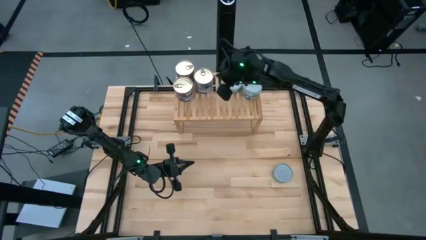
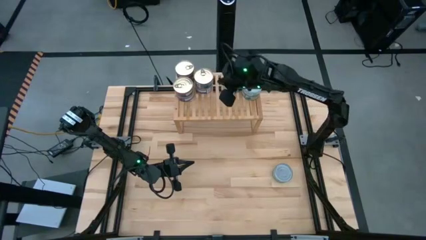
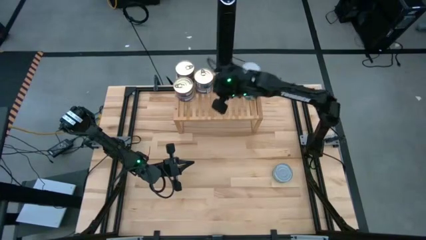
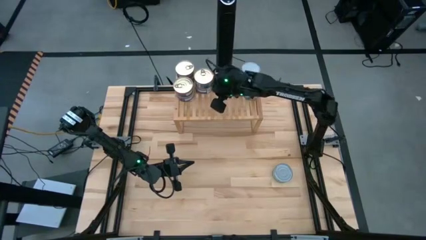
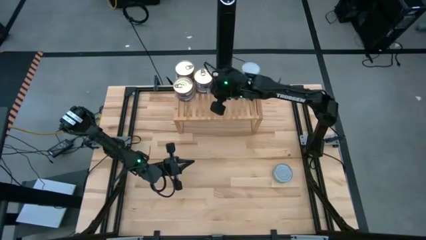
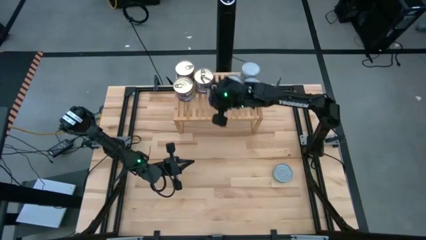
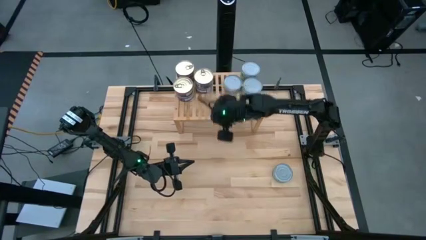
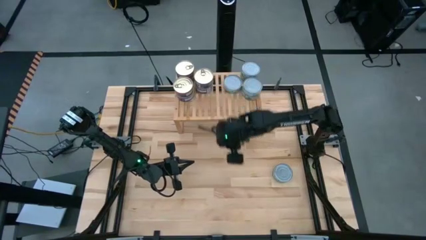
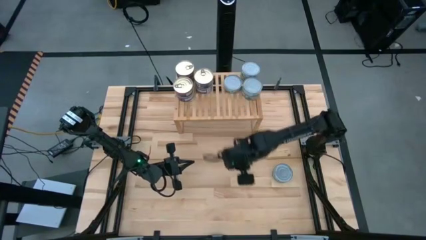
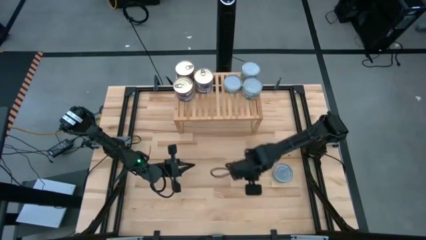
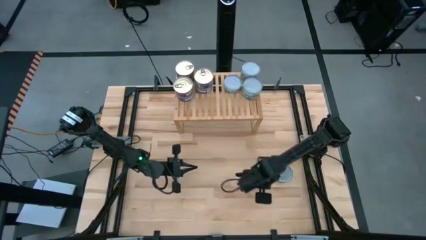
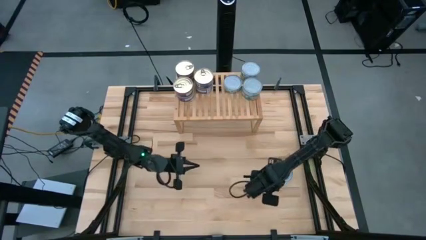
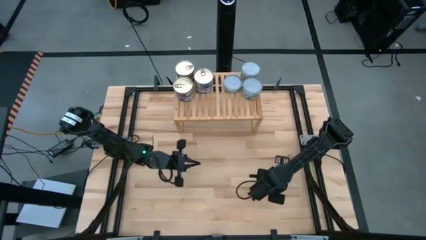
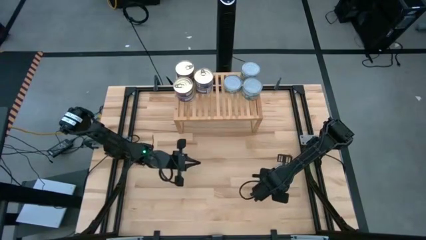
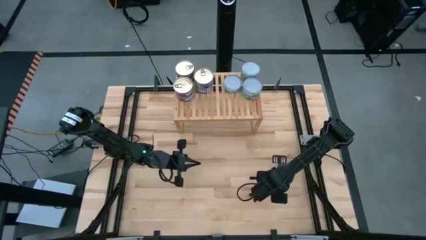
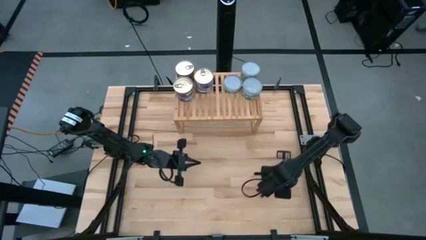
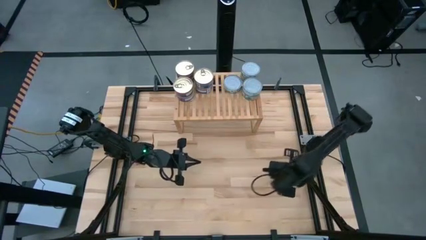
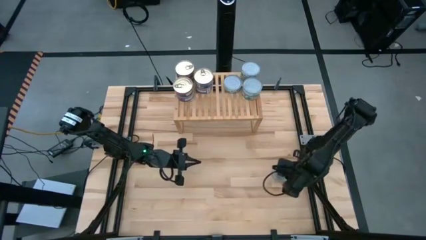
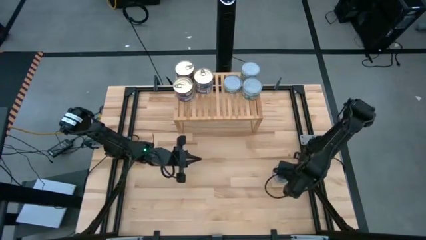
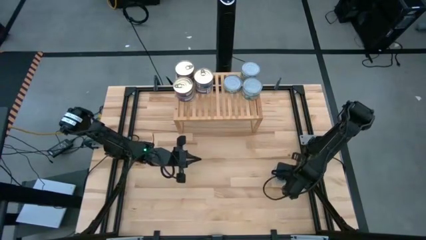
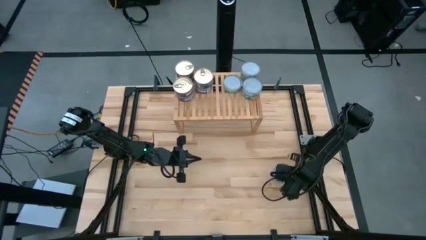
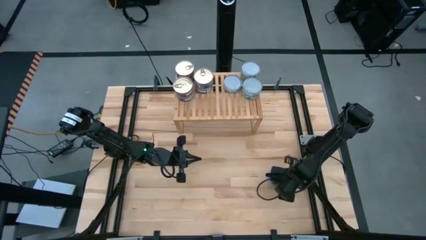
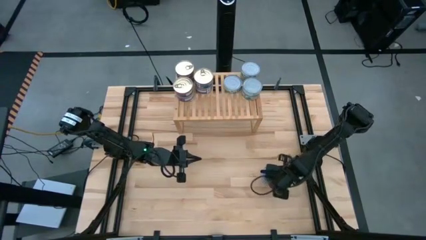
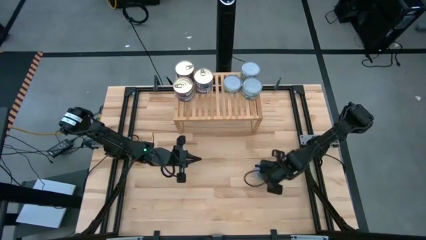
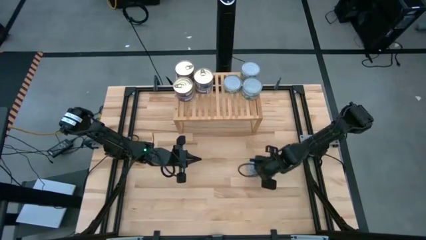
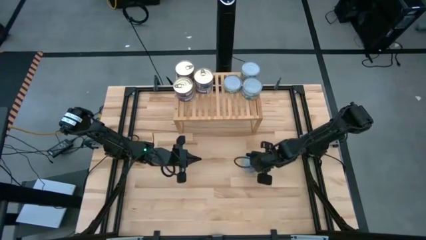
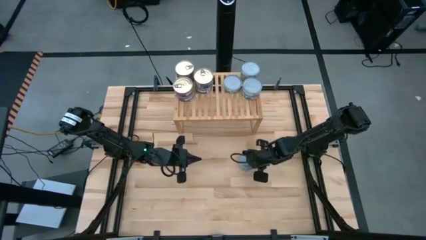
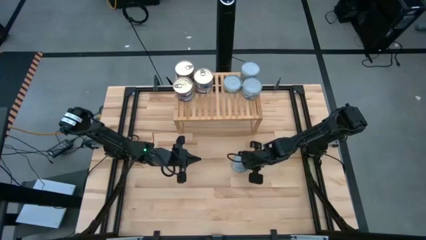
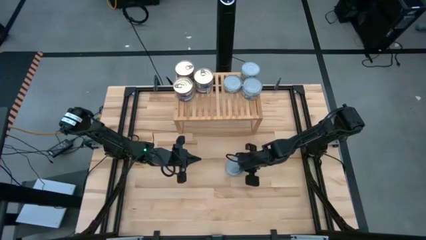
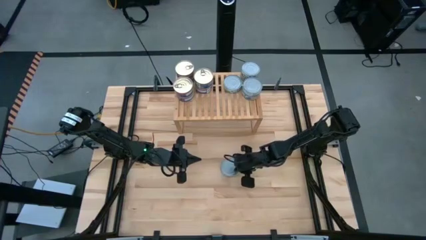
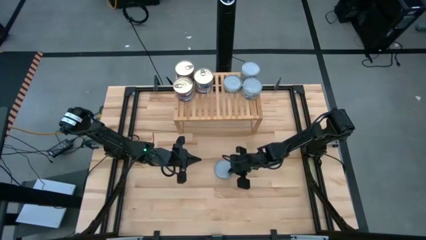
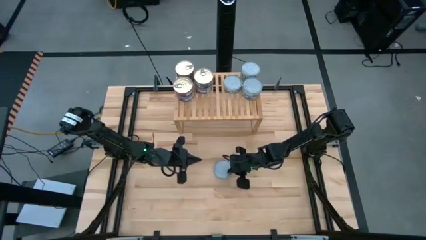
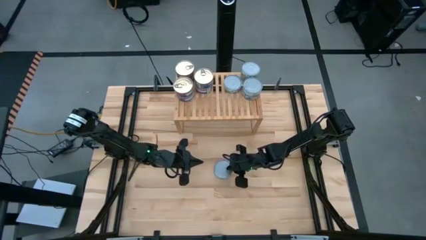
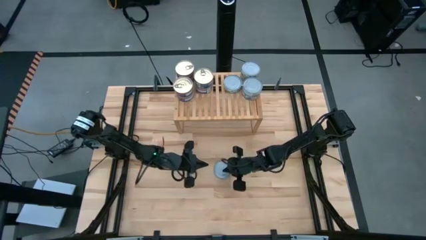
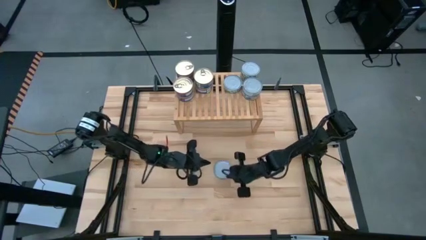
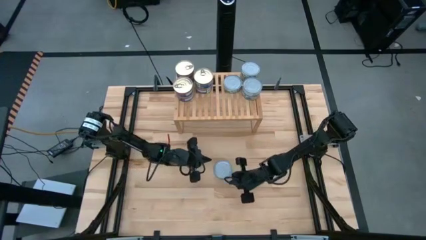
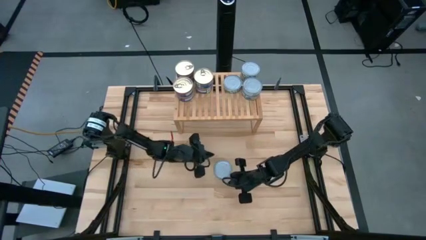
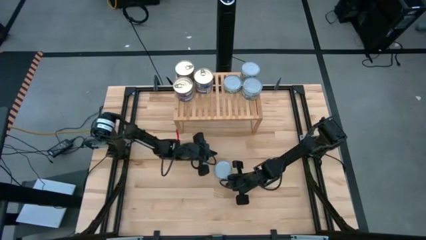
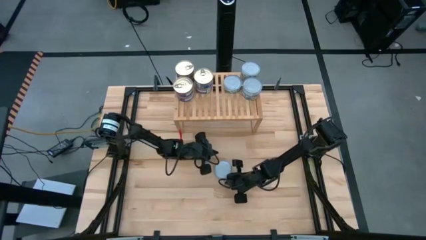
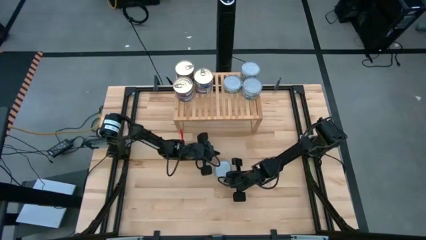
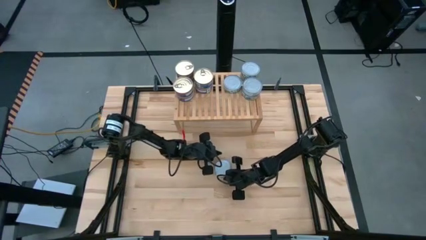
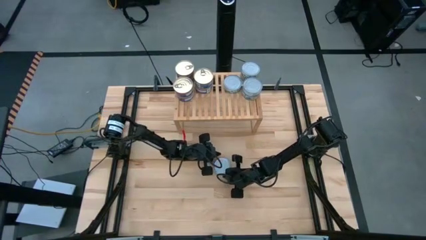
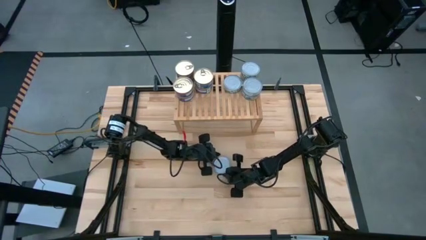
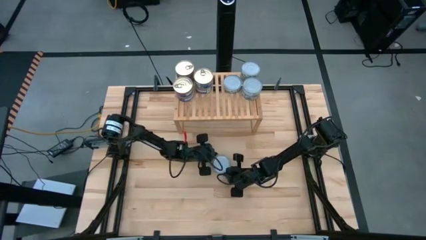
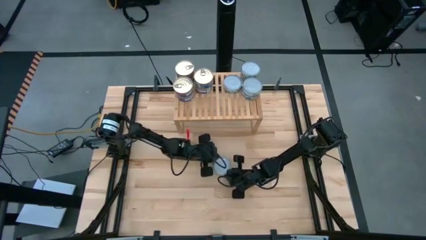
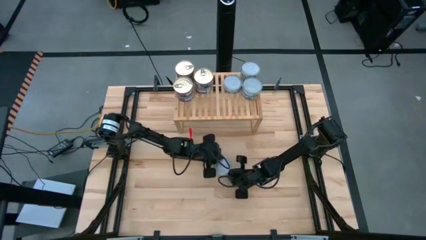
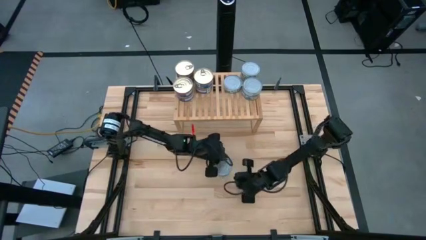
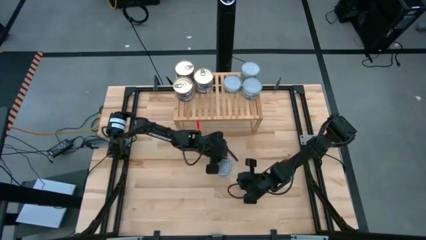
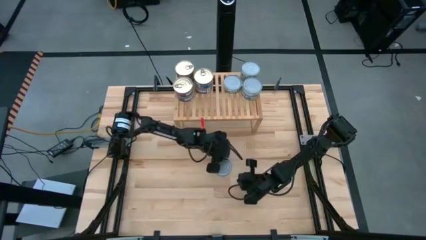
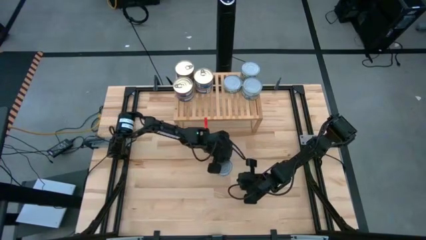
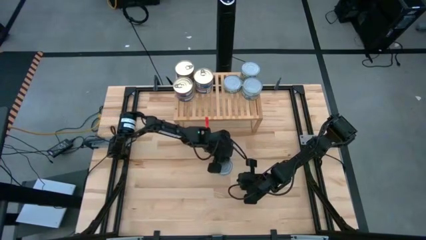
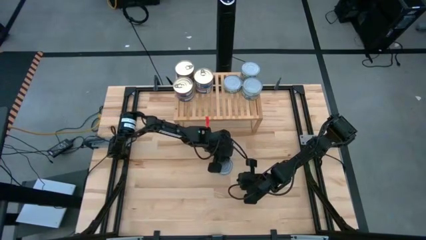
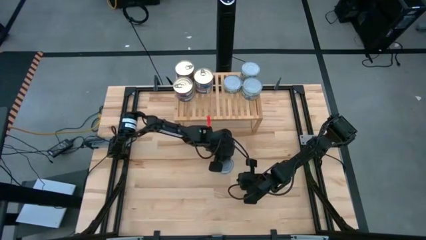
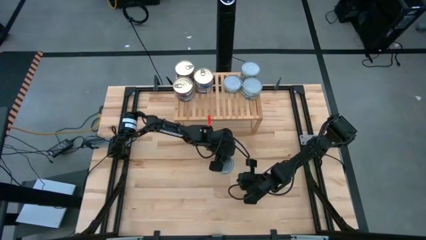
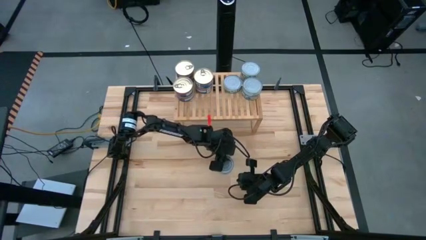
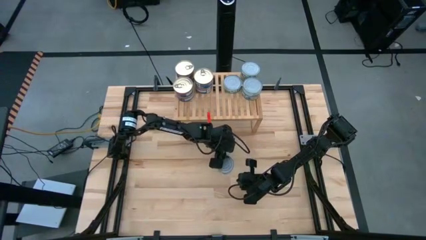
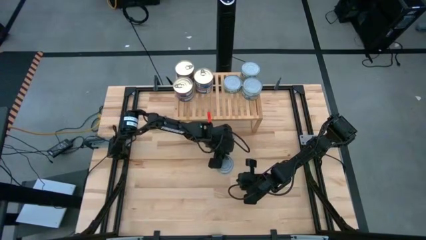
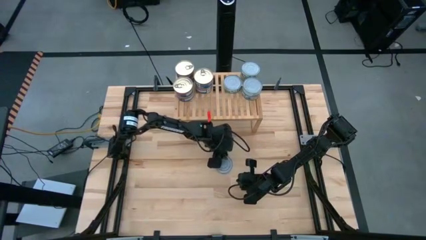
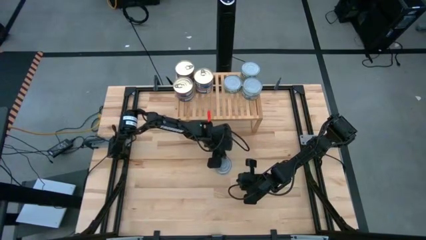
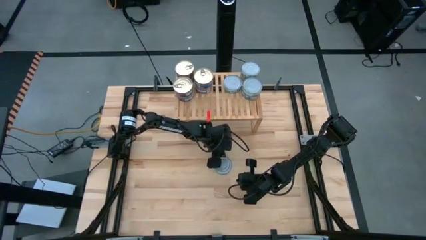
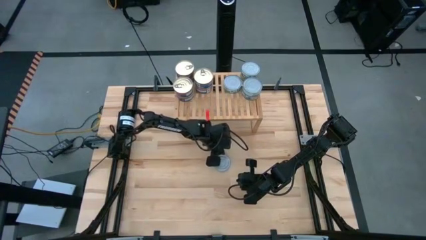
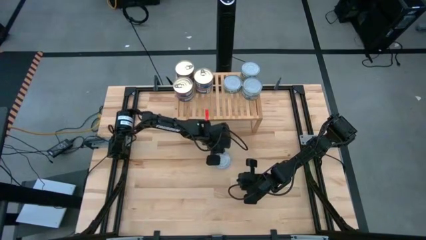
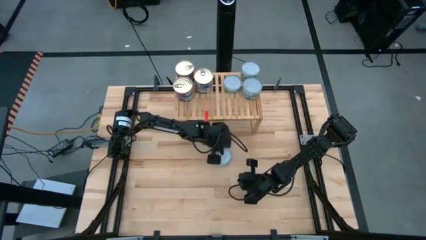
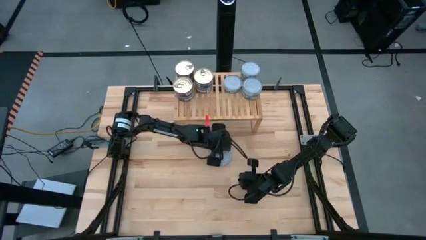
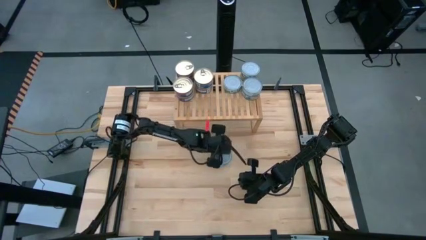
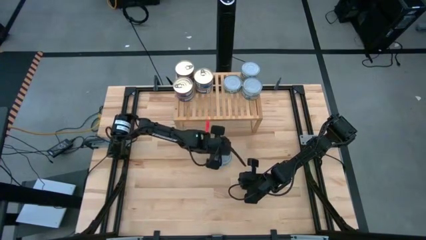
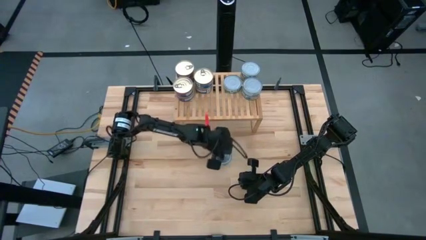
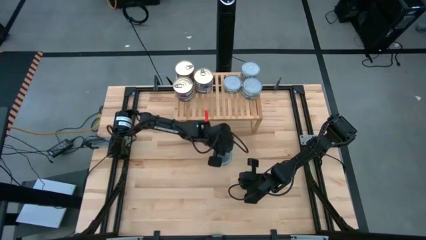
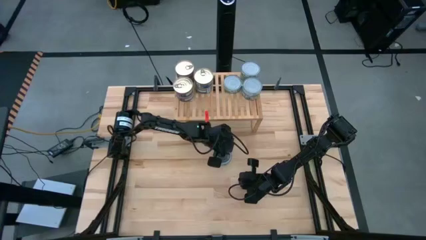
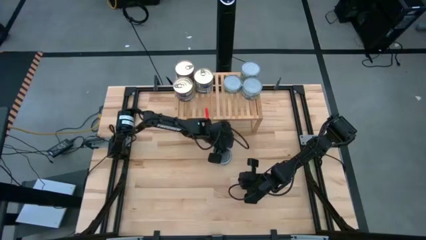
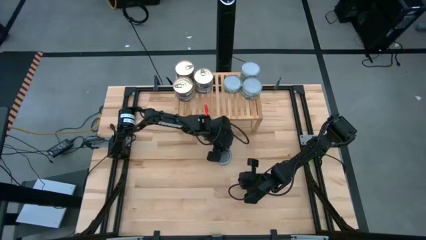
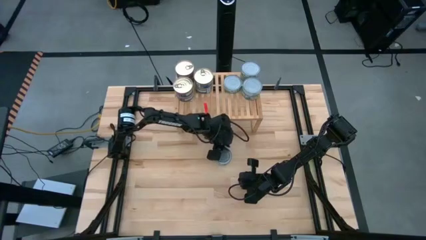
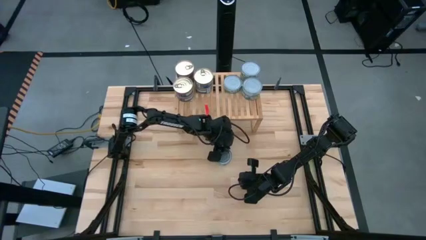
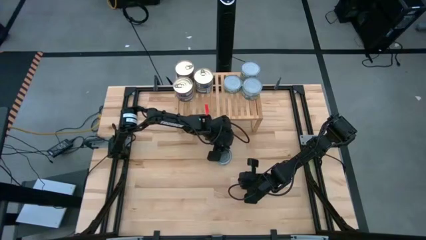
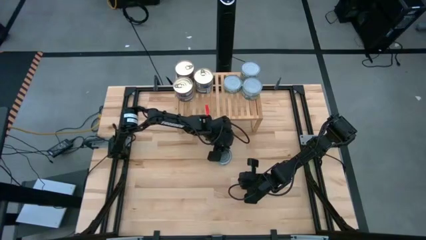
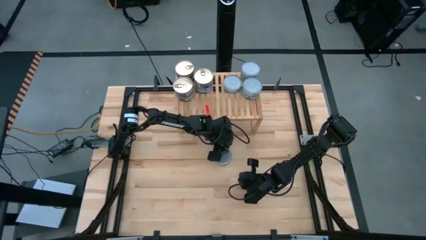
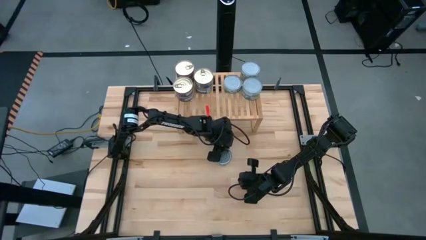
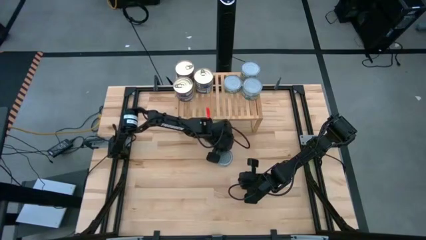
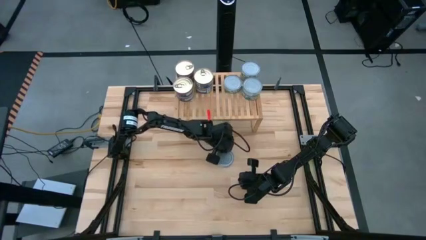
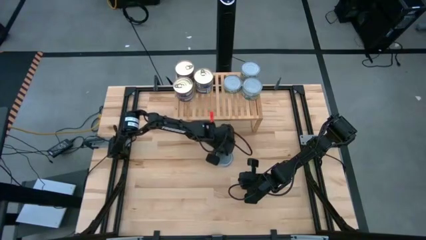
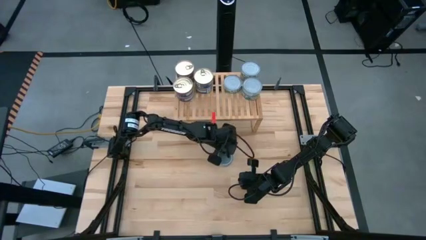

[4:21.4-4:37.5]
Task: Stack canned seafood by type on shelf
Stack the green tuna can on top of the other green tuna can on the shelf
